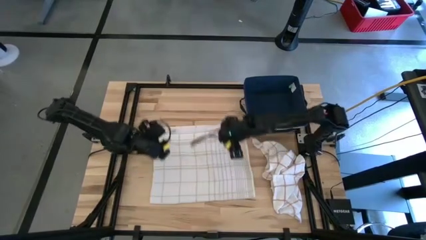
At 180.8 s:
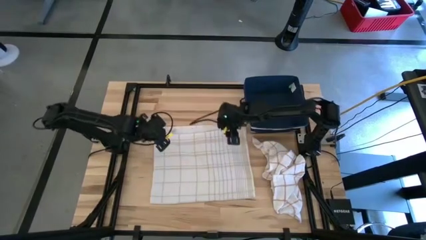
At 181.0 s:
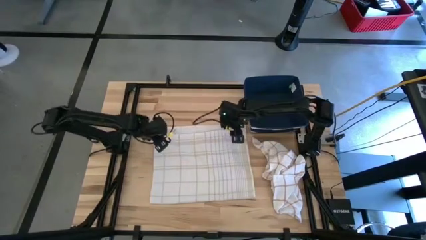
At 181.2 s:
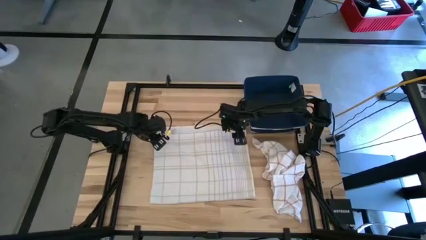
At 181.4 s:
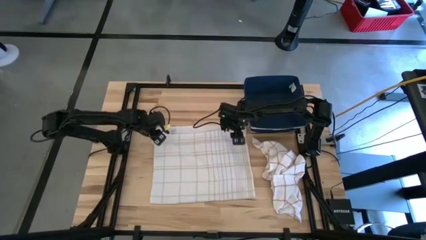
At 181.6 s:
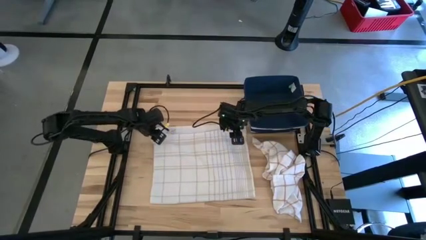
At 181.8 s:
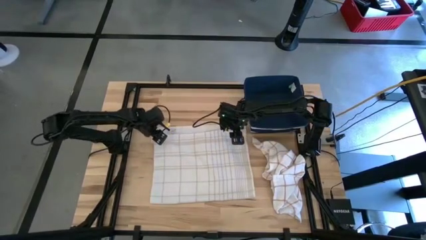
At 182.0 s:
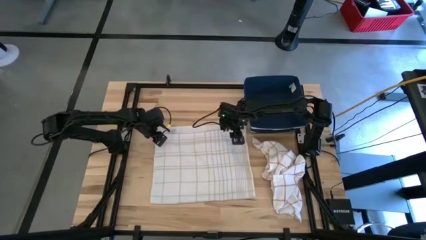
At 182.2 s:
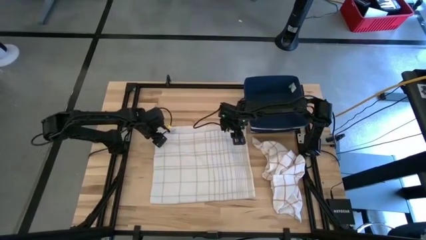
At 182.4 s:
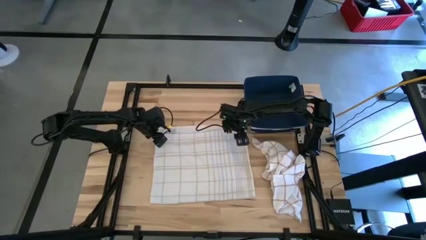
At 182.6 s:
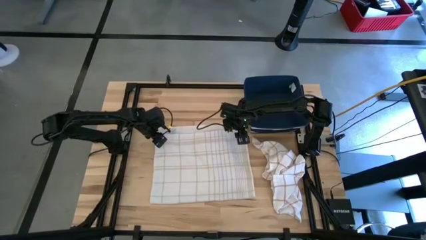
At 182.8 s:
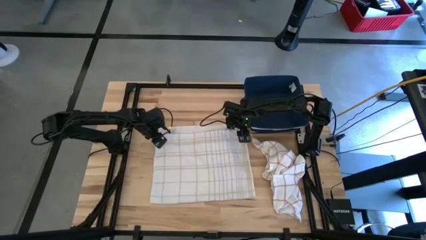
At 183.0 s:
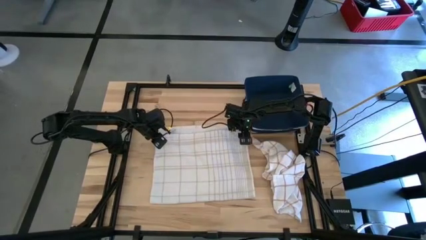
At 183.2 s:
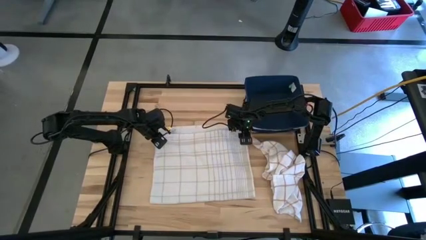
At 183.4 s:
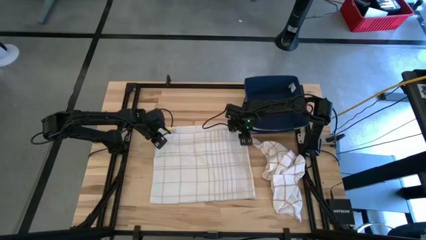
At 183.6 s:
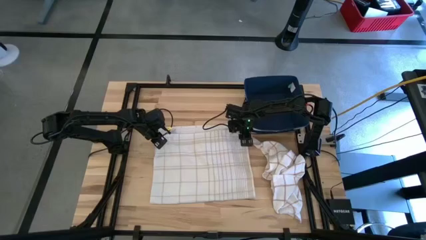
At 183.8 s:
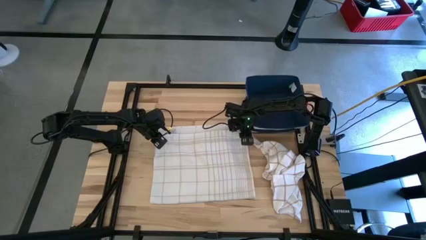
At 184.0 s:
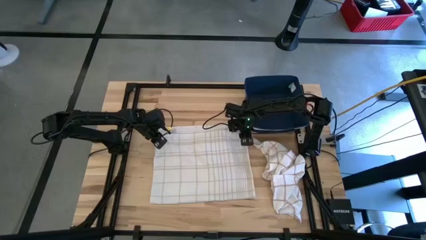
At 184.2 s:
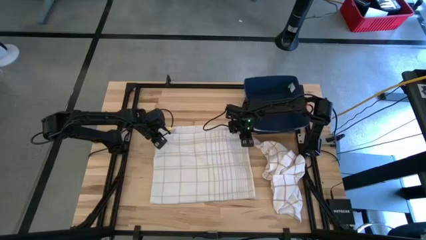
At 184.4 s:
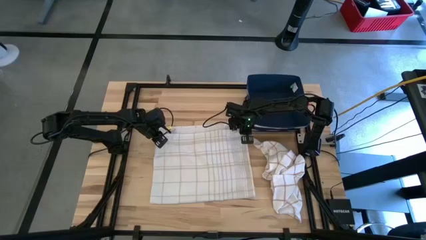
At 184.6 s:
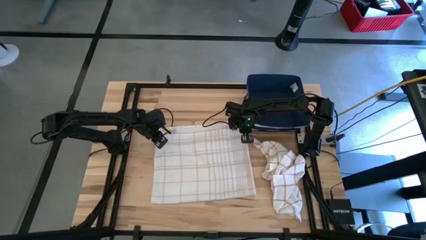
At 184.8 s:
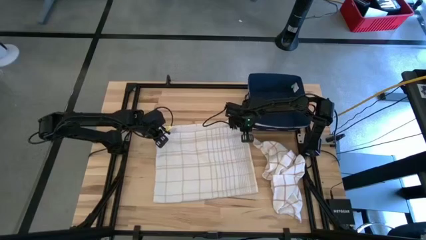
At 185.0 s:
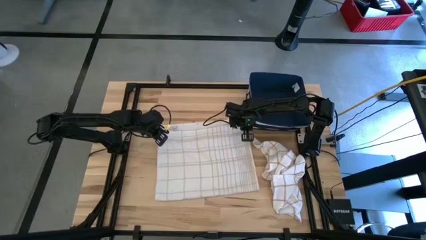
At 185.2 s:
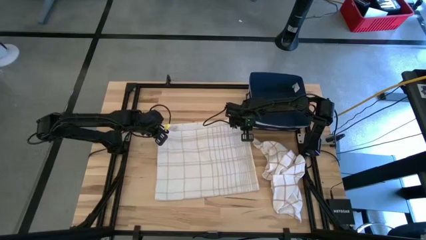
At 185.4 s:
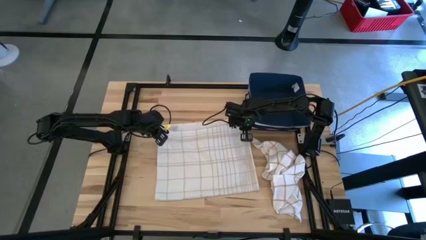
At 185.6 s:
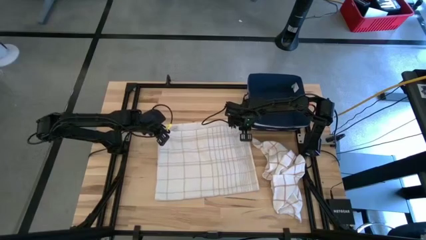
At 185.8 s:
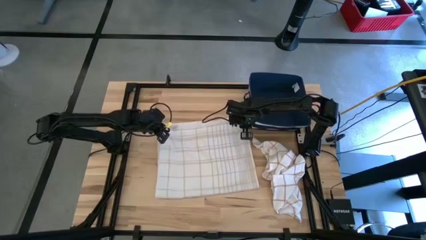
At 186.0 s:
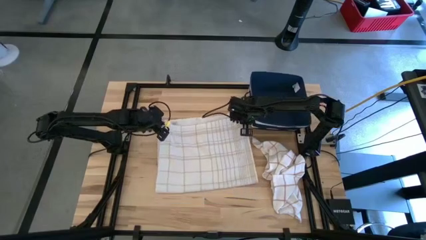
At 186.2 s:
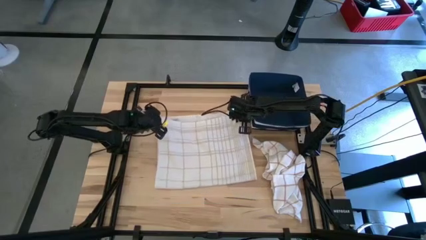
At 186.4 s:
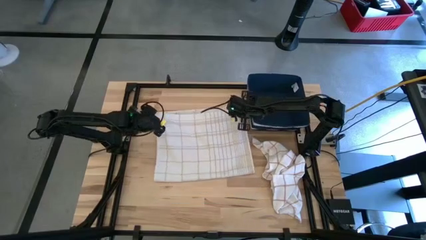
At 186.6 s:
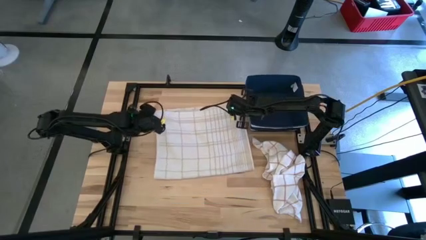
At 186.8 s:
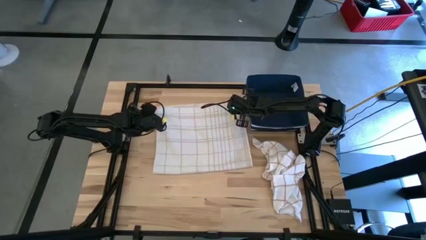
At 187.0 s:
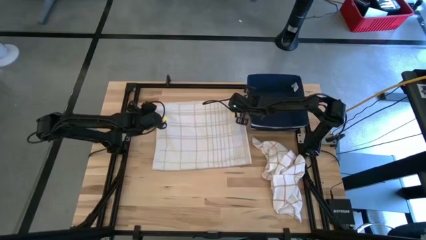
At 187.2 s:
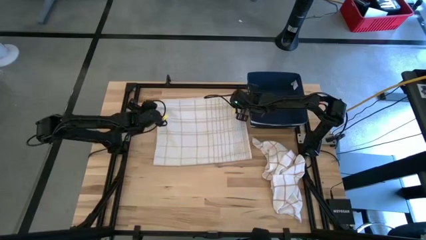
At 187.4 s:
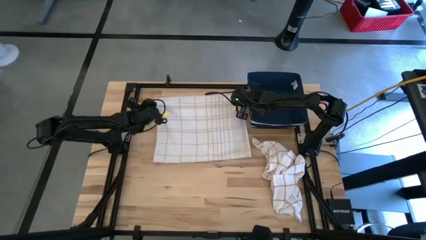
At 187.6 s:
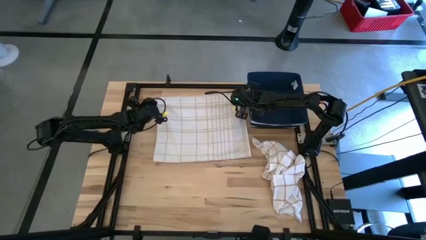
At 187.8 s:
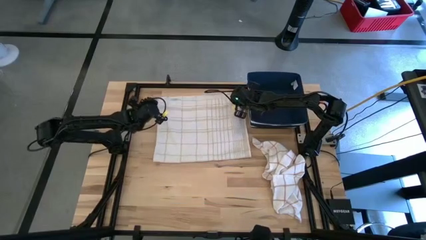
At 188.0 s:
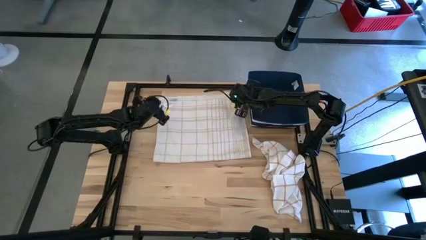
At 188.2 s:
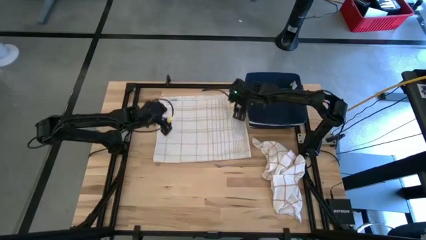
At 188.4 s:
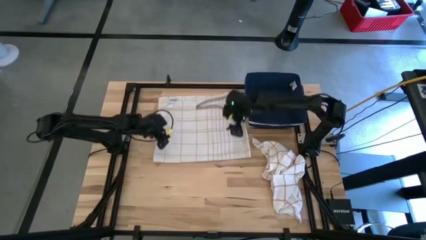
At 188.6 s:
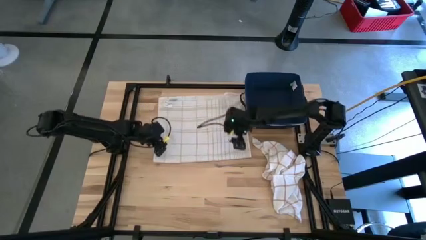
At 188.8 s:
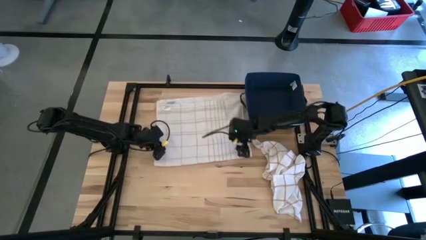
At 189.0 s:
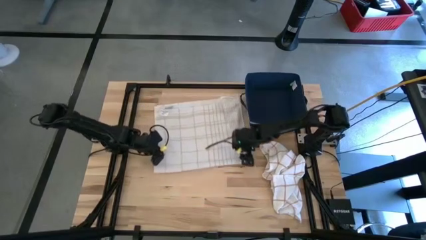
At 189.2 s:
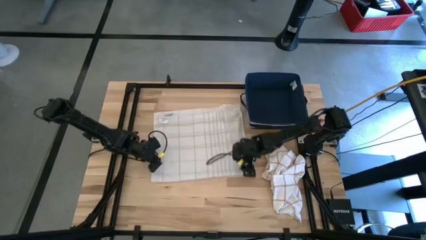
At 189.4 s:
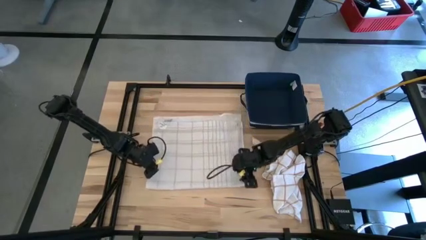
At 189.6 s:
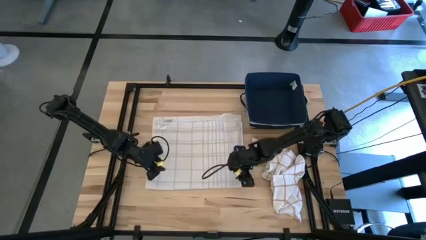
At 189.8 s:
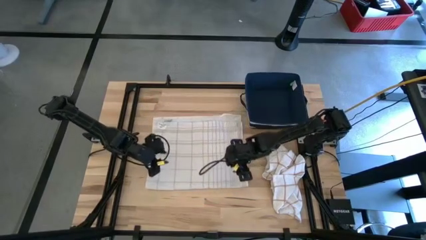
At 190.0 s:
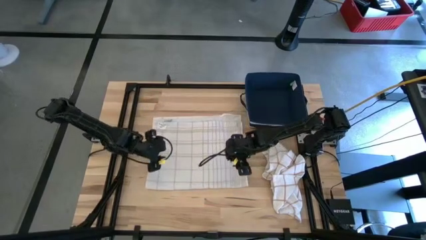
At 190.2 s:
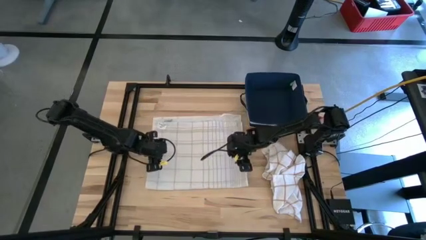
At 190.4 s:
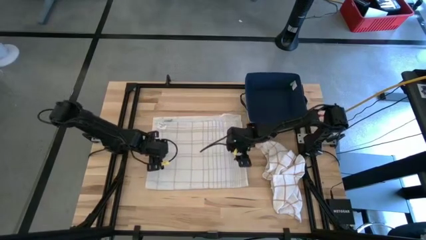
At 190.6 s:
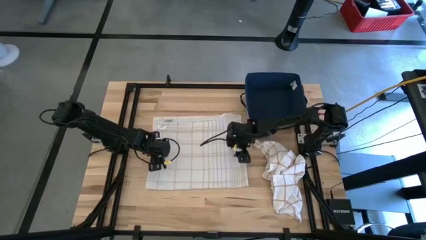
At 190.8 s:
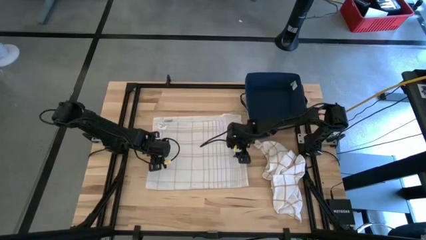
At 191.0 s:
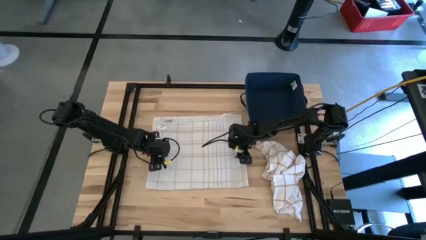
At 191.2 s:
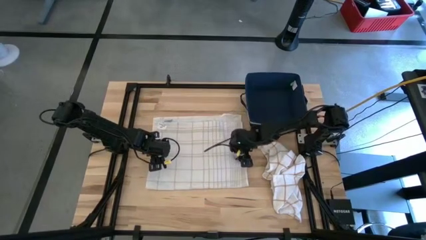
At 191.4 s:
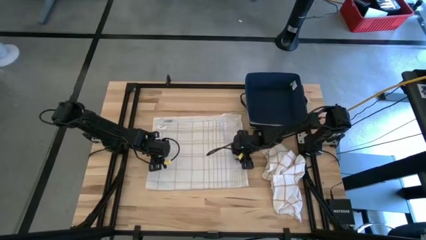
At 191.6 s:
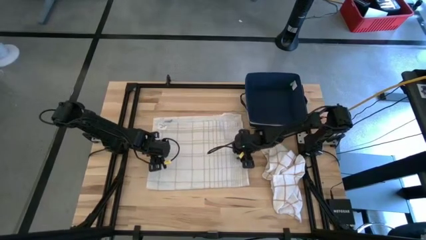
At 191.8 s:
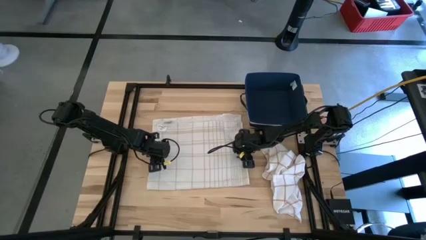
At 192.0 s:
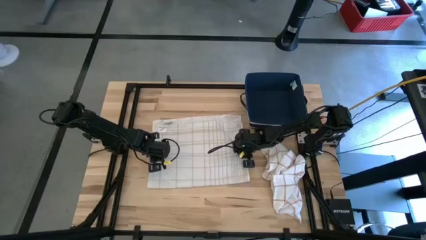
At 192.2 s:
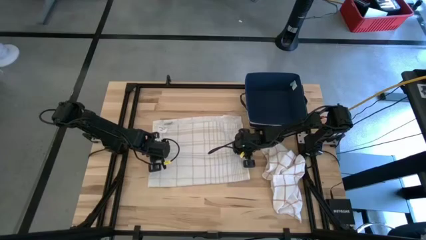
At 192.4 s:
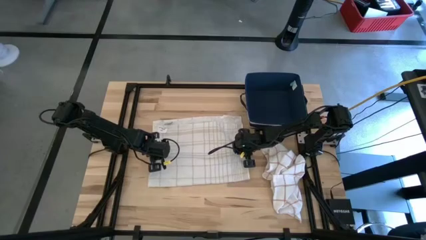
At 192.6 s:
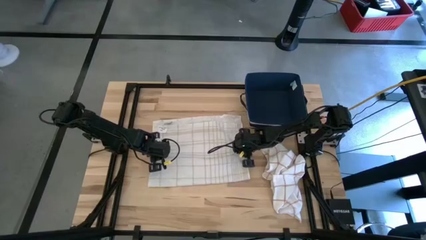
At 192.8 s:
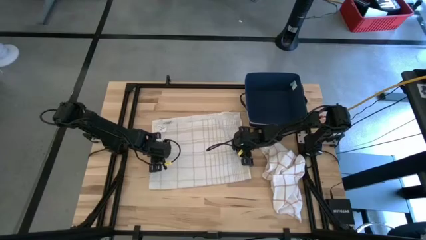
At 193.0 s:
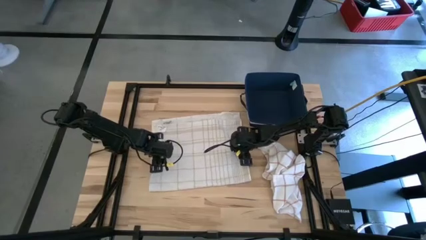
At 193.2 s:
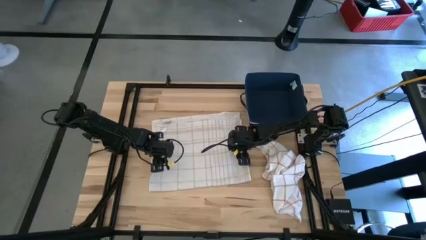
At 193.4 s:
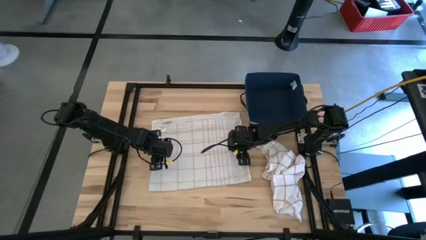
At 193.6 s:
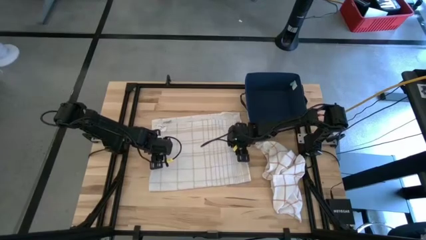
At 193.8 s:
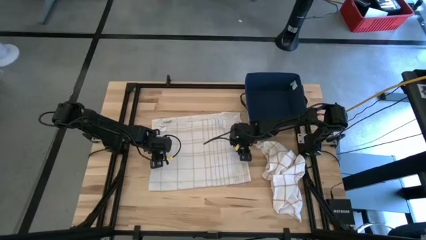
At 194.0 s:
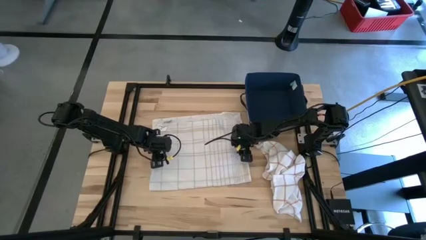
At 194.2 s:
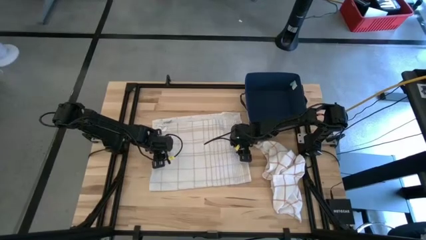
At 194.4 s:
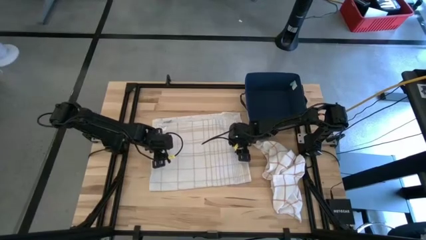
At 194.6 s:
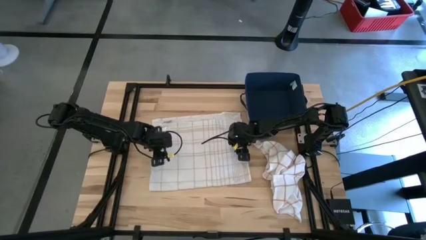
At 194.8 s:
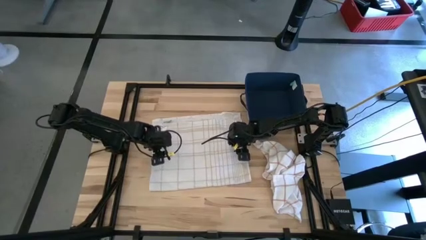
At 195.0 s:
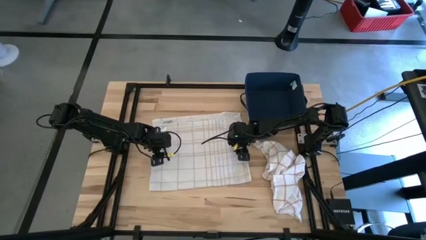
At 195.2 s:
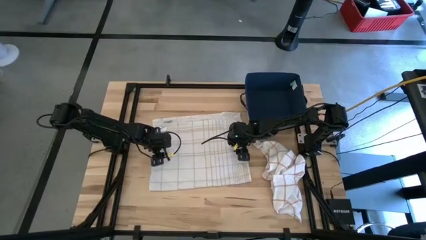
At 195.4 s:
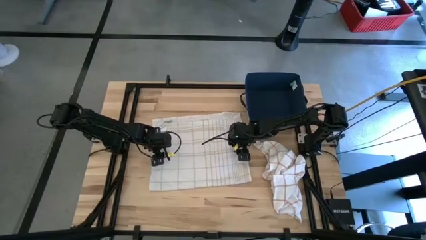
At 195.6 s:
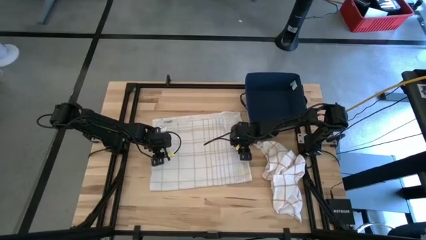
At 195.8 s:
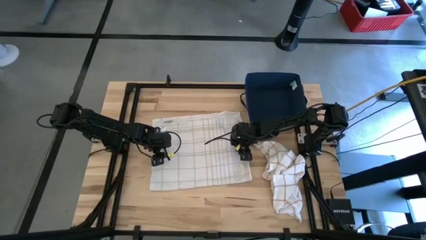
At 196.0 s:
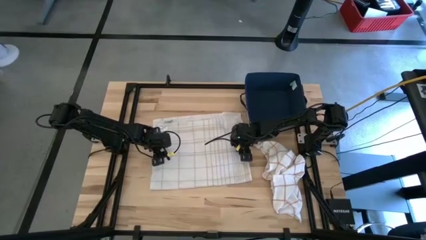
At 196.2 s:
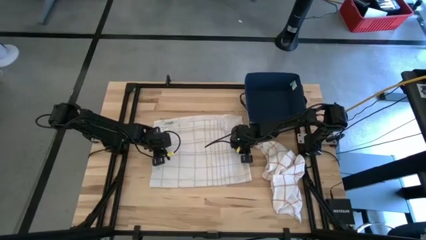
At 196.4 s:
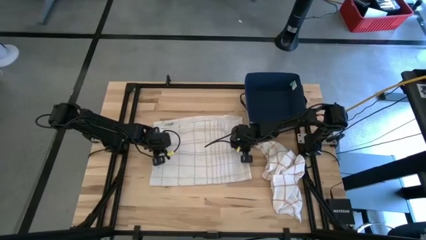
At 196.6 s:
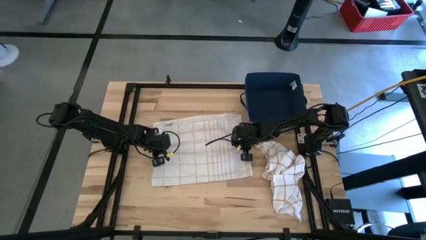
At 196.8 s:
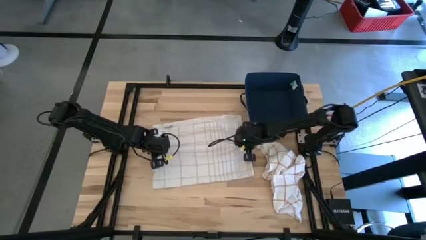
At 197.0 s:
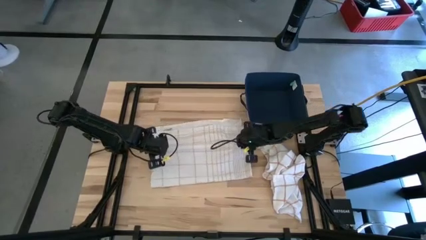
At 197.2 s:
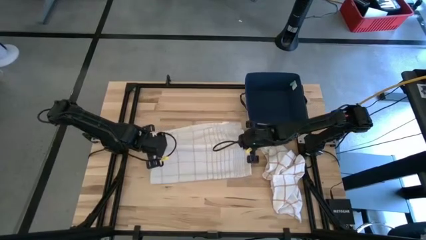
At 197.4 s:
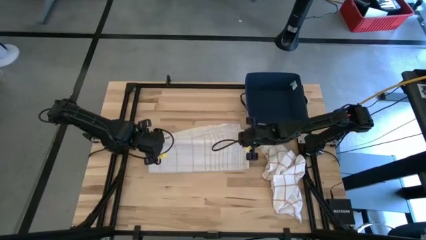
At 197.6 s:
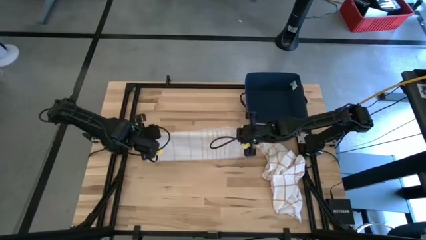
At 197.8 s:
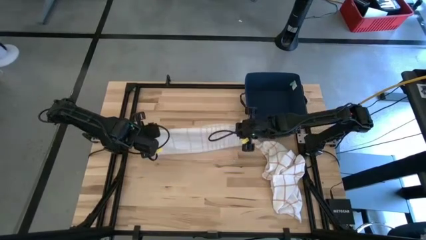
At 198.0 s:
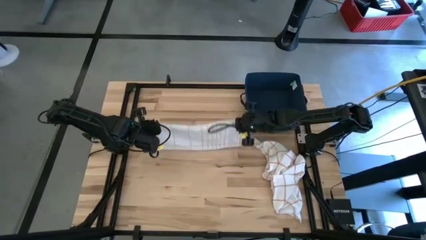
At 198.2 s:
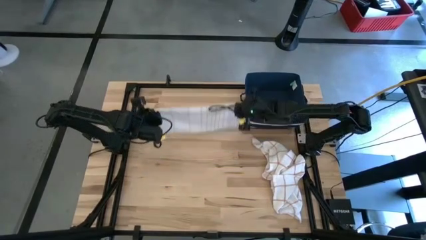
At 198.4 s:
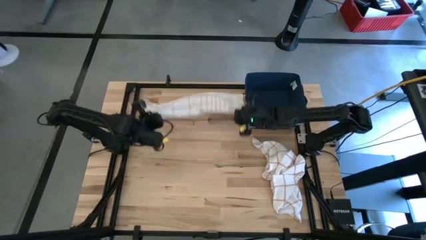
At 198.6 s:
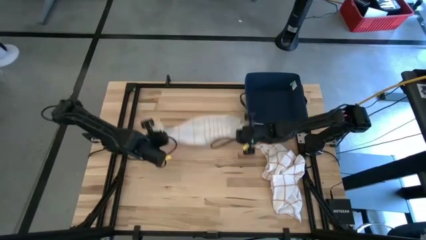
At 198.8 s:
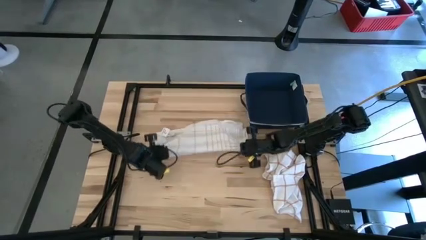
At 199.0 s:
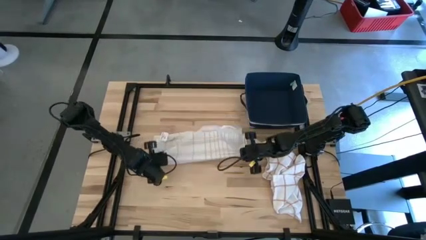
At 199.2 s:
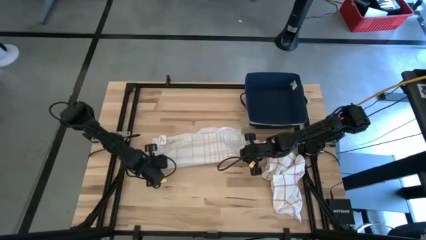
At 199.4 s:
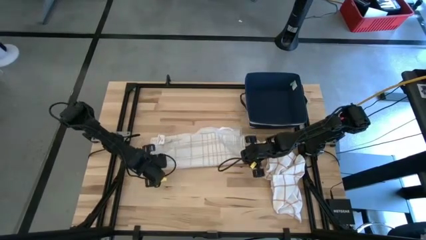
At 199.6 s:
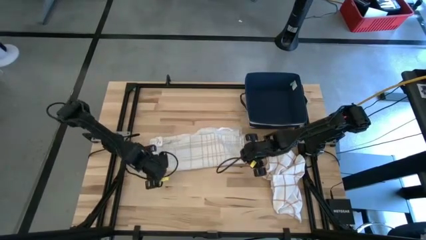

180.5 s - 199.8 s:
Task: Fold towel
Fold the white patterned towel
